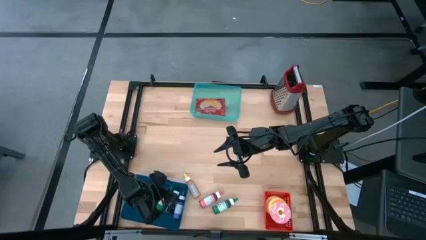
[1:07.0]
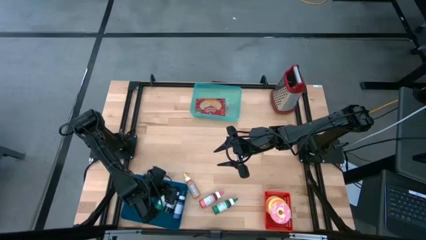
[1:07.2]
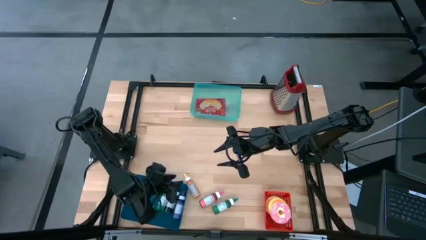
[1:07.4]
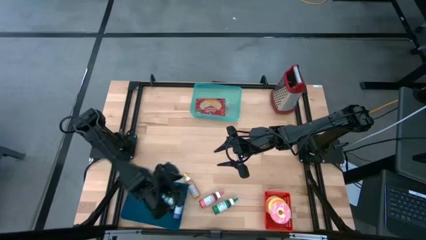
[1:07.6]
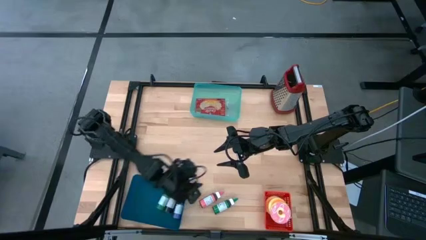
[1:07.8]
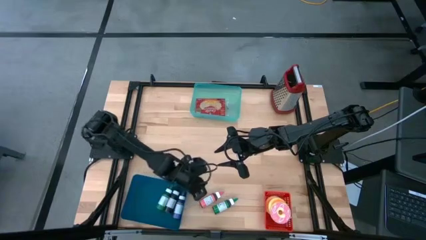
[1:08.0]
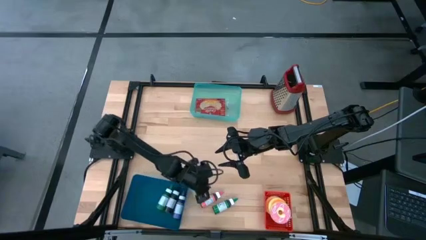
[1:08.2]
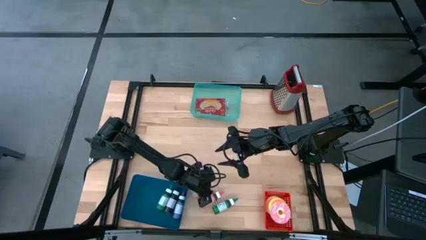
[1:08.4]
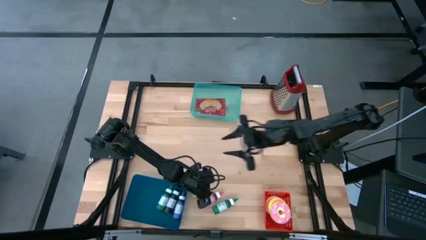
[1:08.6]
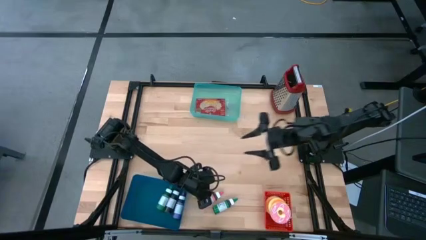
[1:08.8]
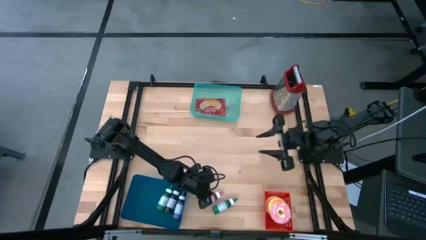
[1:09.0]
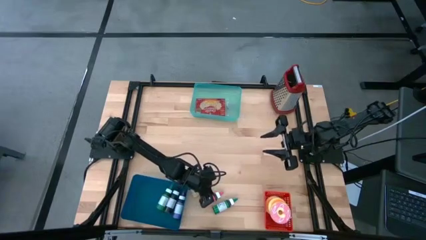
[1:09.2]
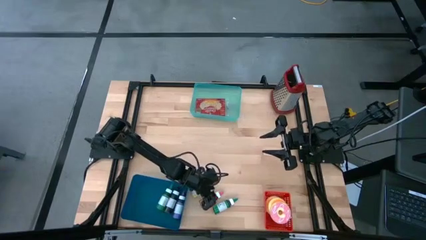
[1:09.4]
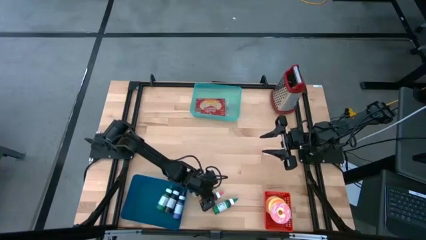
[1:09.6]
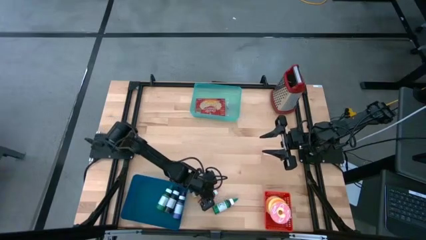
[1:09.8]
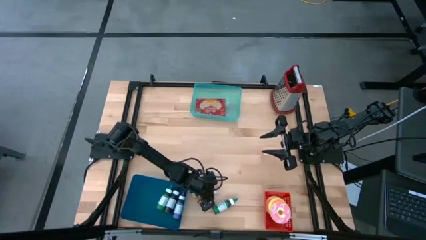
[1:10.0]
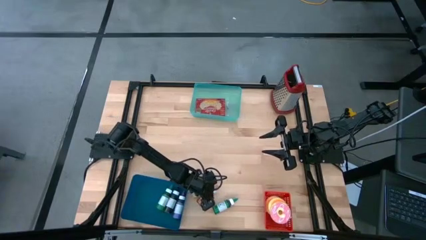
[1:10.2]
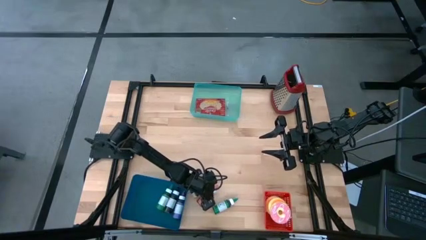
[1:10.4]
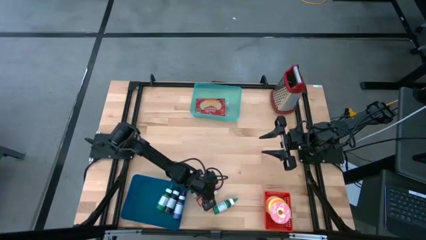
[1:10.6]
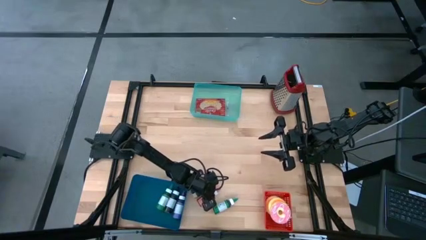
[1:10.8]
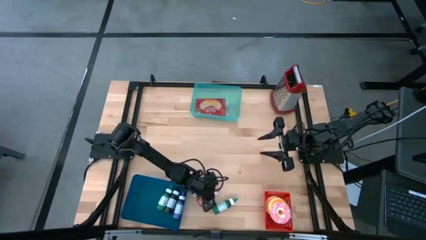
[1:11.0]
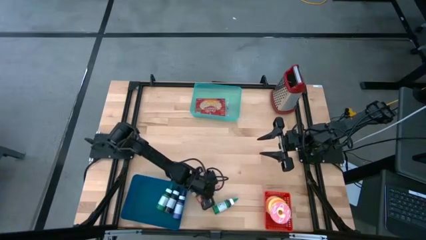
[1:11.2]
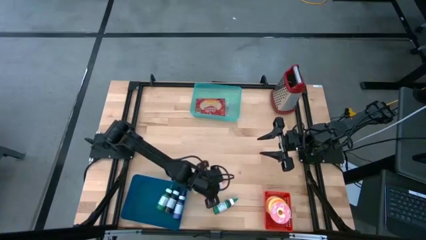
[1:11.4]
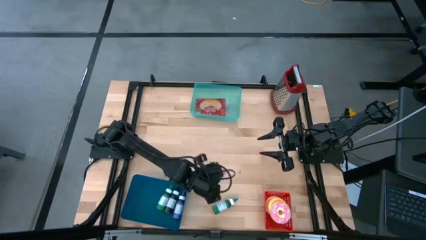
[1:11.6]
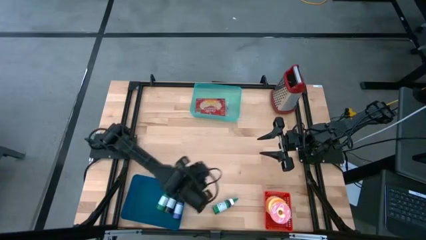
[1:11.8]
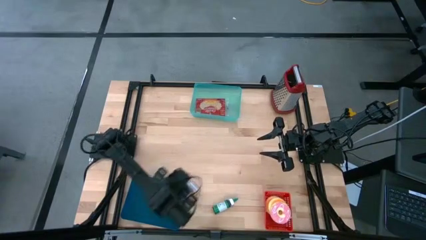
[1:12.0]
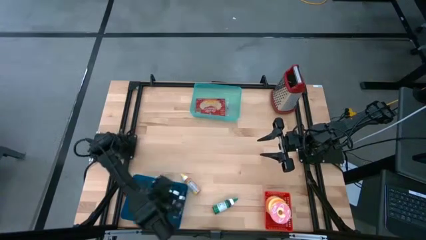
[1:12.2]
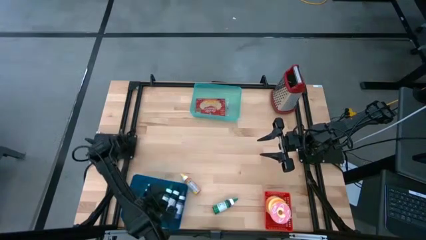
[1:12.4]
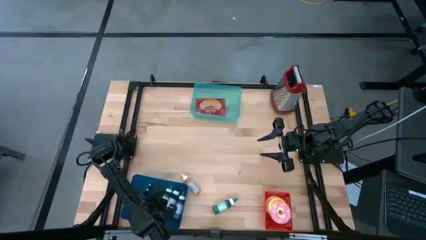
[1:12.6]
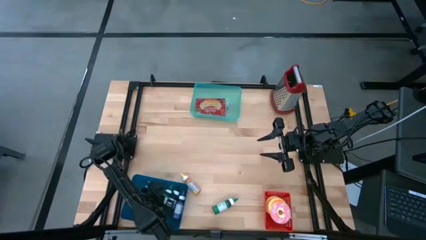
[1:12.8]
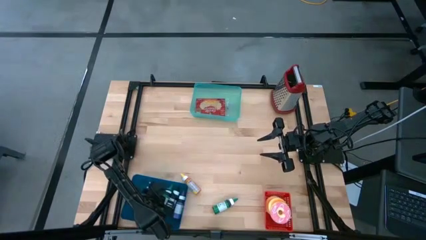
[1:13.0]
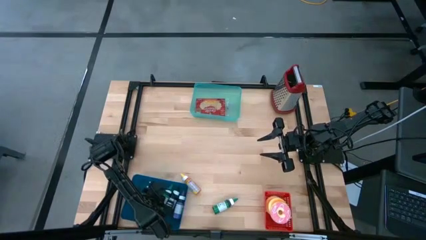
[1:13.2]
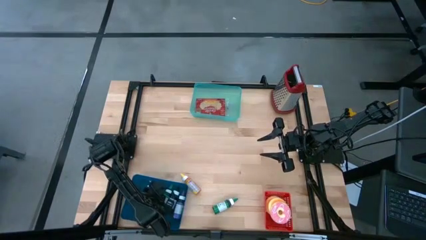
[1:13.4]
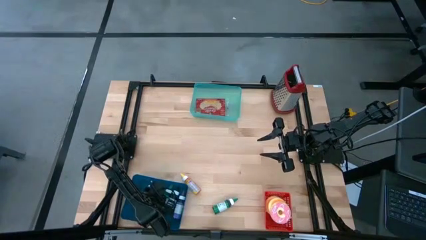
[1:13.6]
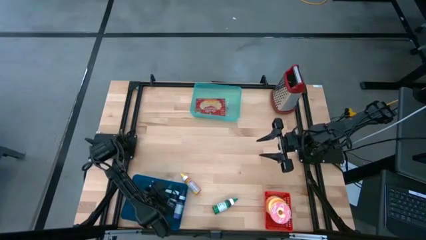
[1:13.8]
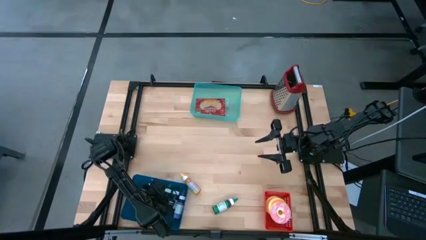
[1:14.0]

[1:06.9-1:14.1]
Put the pink food coloring bottle into the dark blue bin

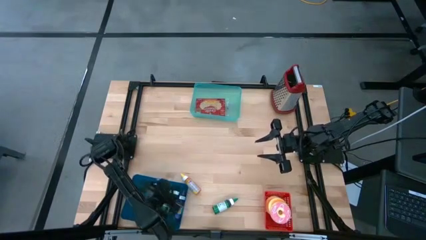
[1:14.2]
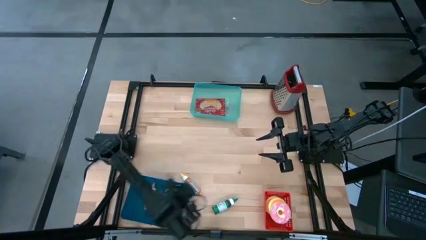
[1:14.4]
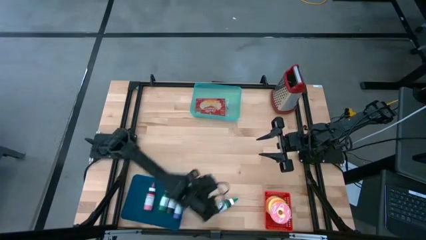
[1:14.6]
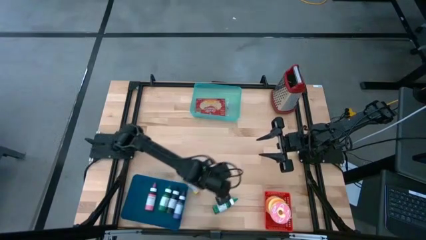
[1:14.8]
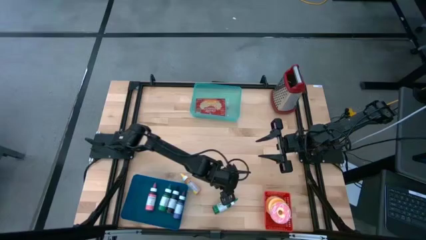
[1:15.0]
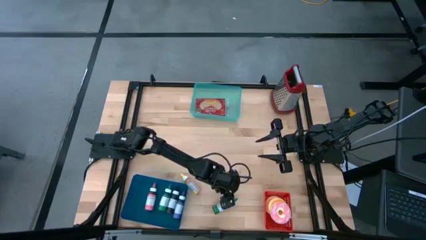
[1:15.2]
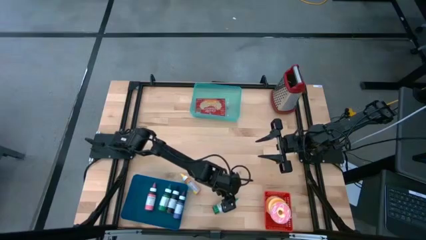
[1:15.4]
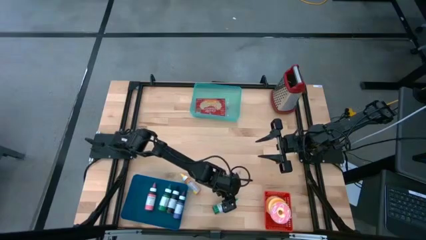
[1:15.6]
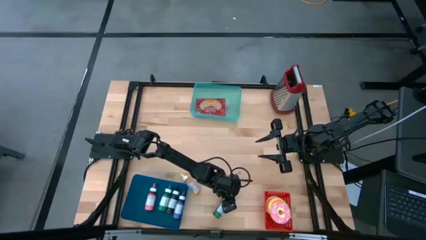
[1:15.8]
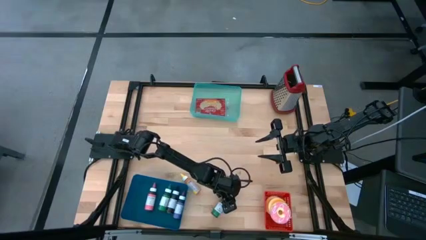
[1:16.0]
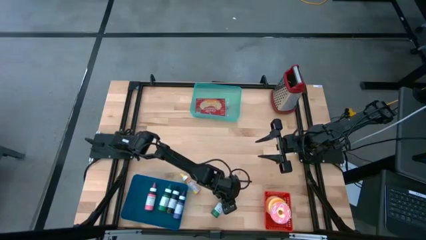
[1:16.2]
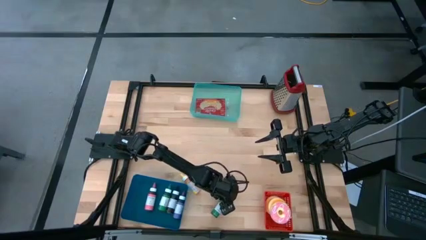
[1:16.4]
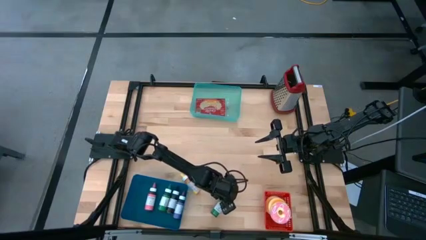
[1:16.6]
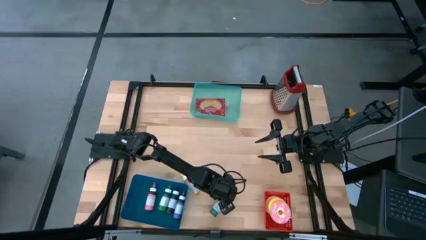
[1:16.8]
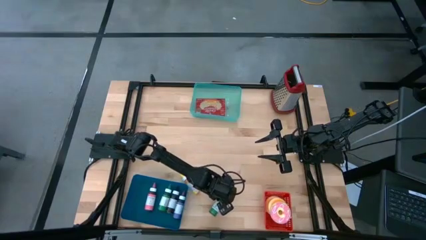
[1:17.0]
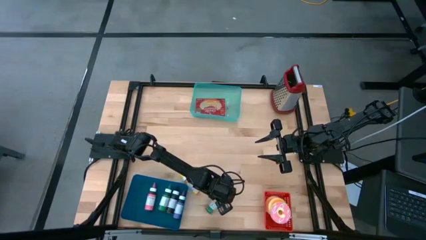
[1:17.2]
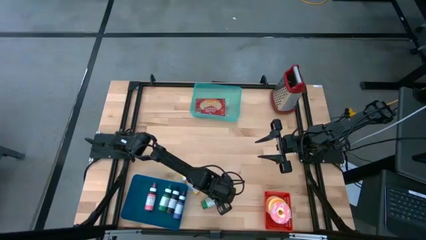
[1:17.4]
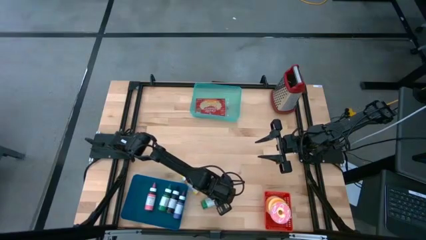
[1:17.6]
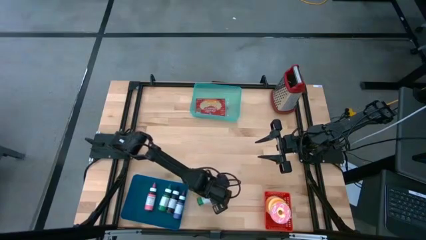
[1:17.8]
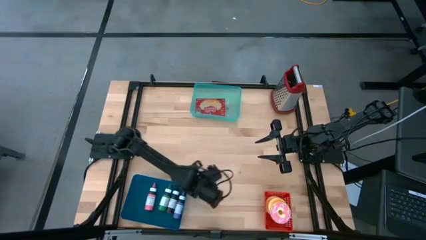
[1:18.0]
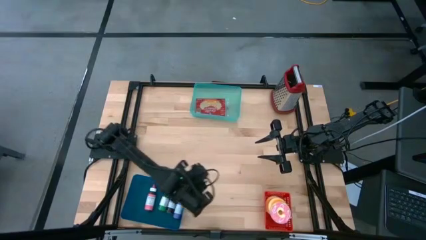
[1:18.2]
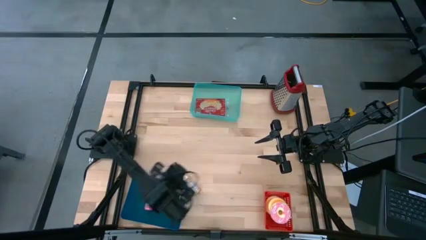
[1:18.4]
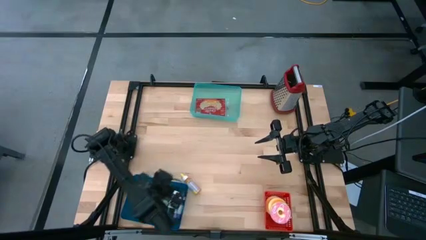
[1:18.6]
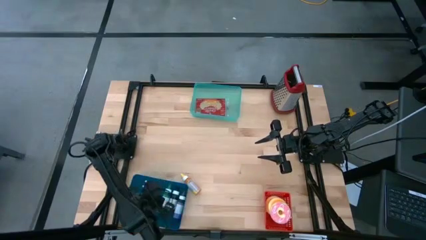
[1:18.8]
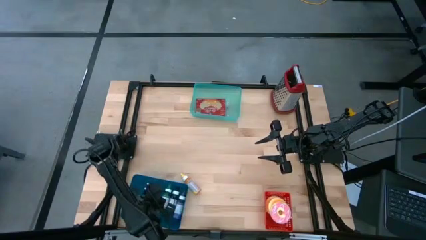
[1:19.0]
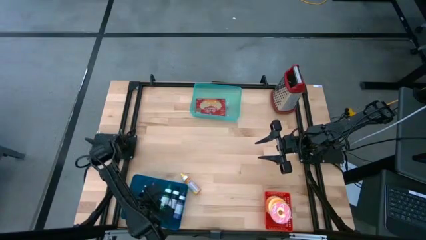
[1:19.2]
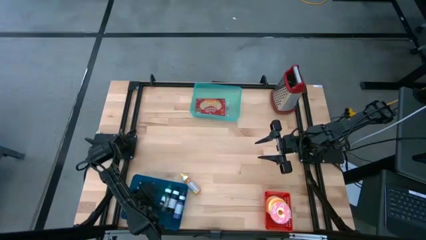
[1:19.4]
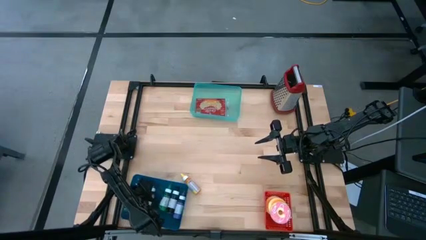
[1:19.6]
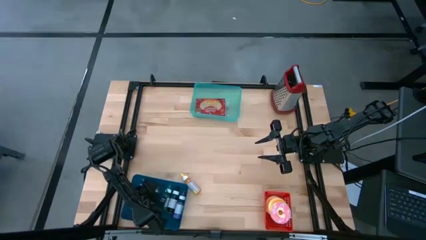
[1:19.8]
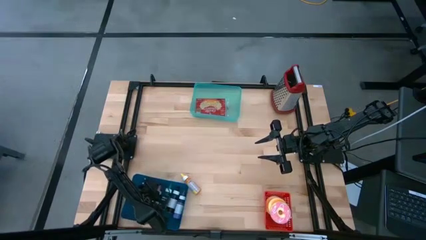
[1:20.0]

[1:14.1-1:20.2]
Put the green food coloring bottle into the dark blue bin
